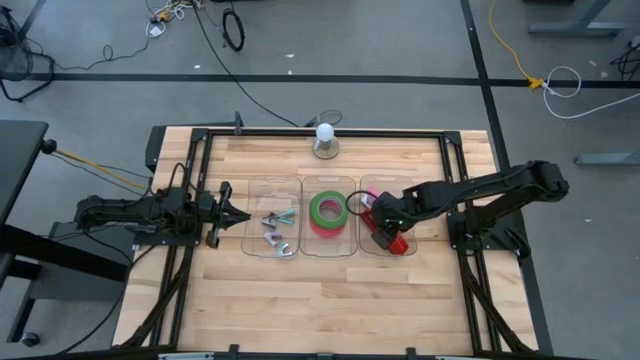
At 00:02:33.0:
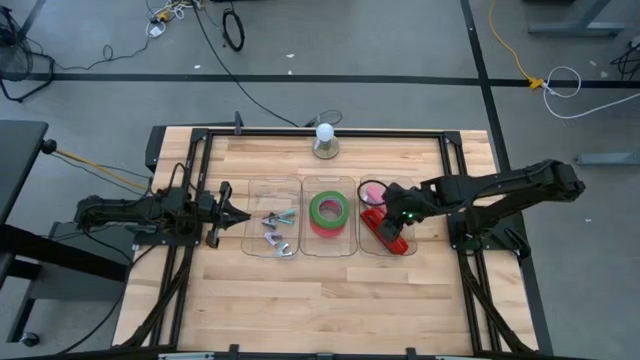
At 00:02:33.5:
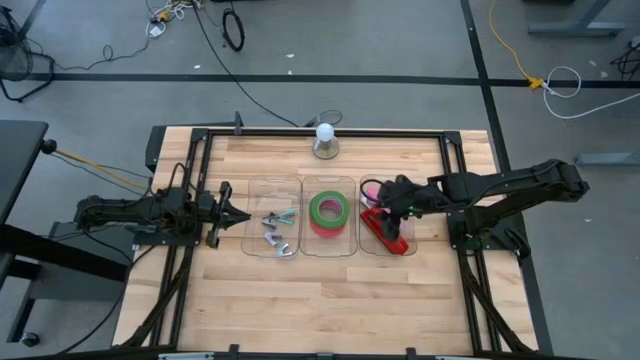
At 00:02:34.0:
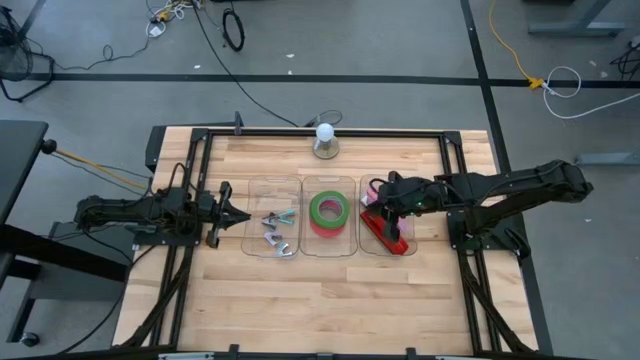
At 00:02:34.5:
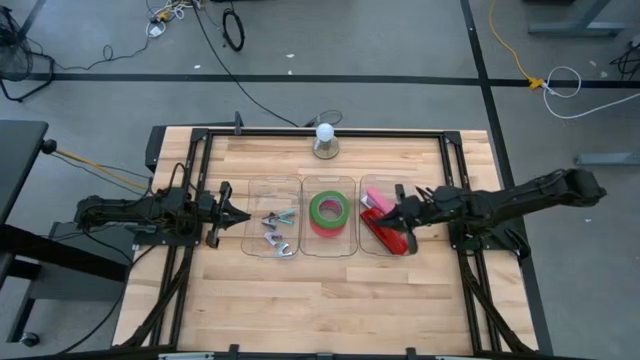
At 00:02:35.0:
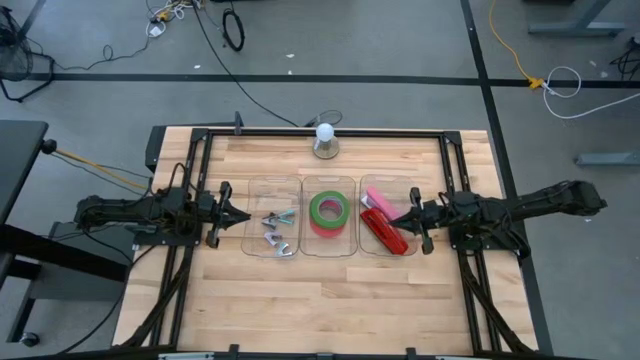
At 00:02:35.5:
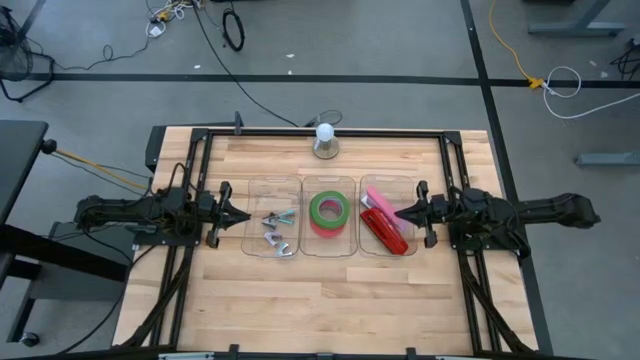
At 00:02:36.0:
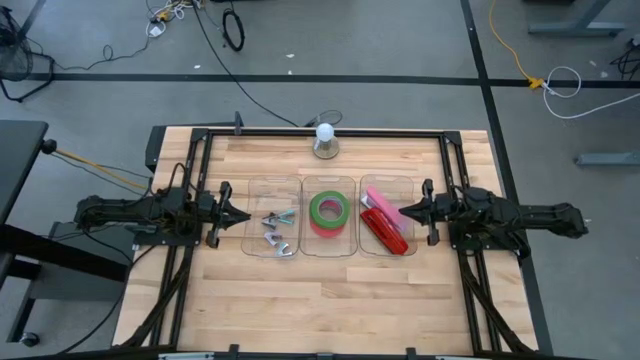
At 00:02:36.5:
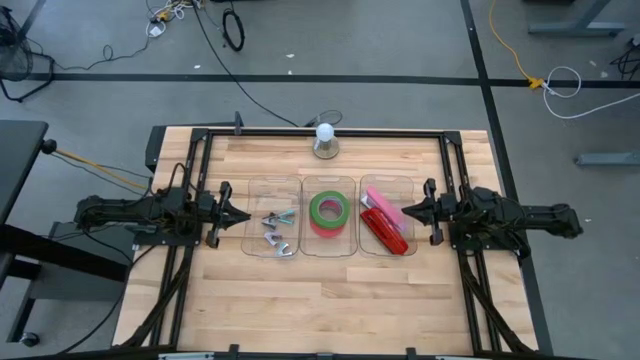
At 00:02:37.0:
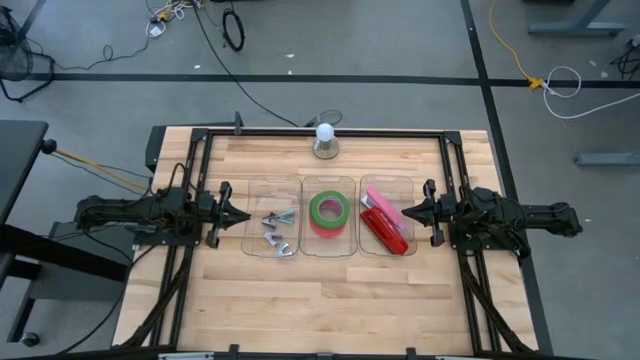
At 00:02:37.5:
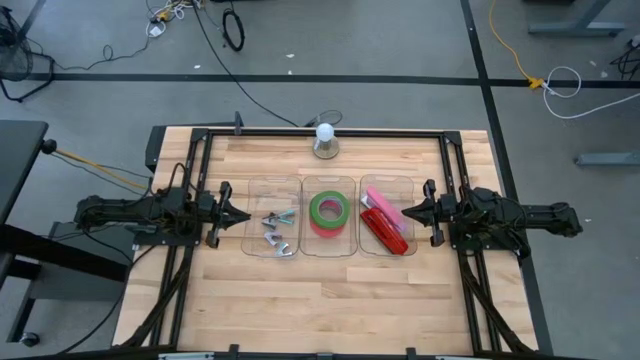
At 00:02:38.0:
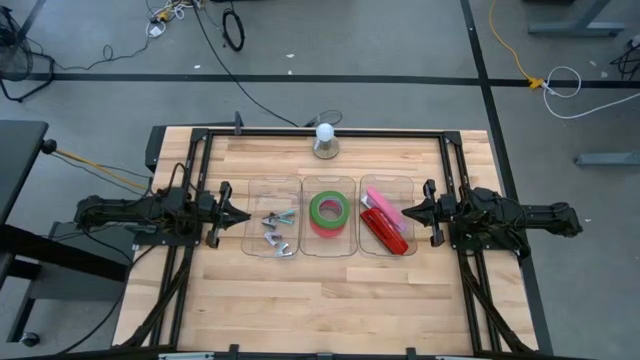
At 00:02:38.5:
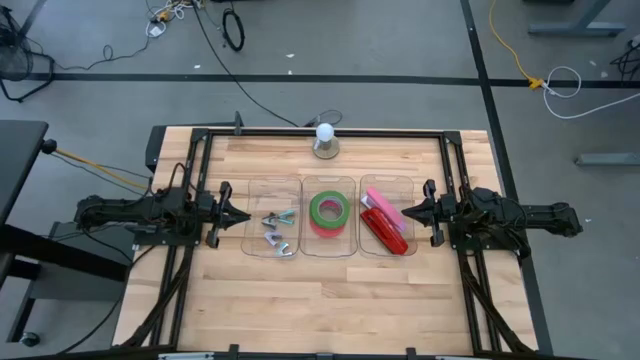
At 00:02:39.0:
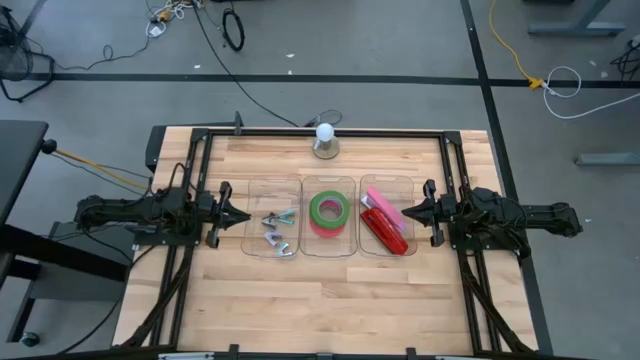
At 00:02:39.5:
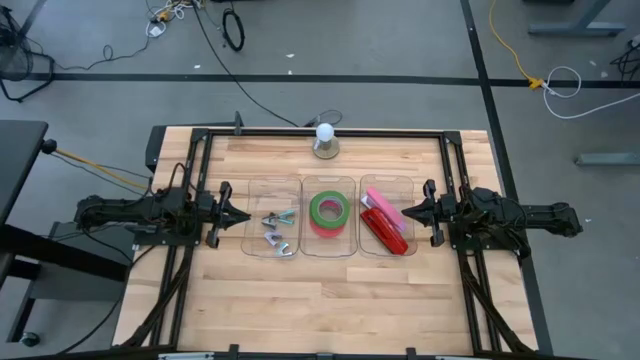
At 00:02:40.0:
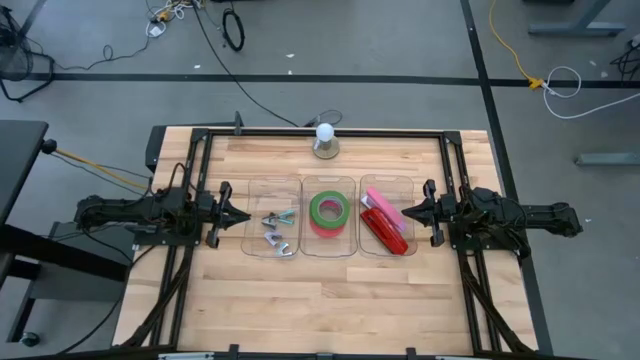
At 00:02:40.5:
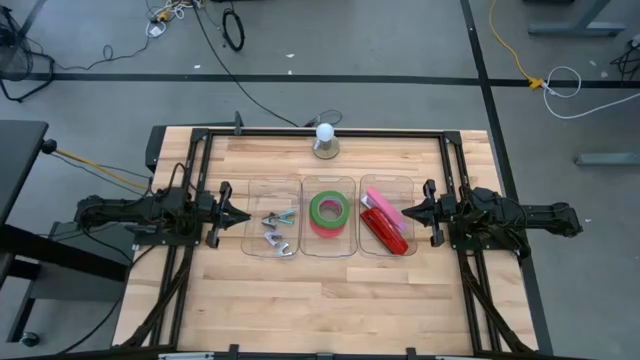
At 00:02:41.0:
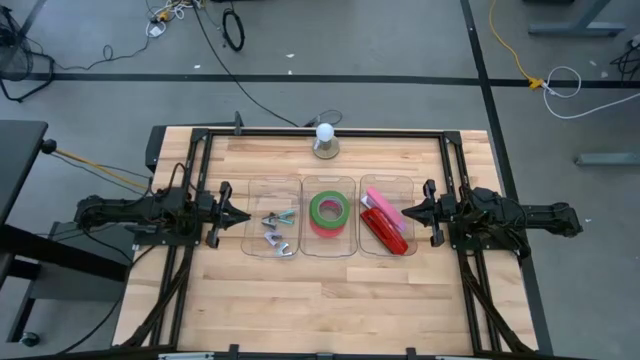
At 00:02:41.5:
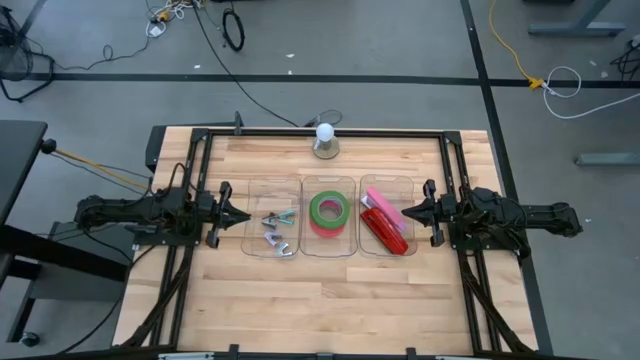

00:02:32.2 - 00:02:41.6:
Task: Pick and place Stapler, Stapler remover, tape
Return to Home Position

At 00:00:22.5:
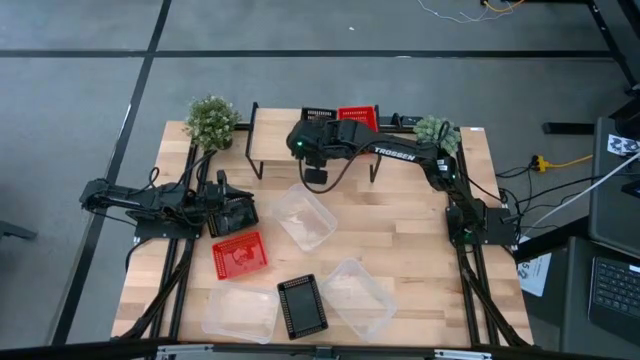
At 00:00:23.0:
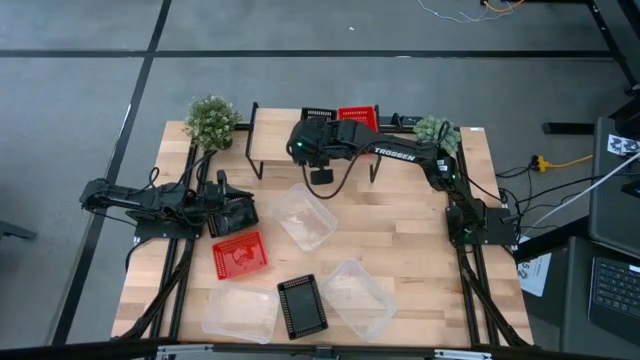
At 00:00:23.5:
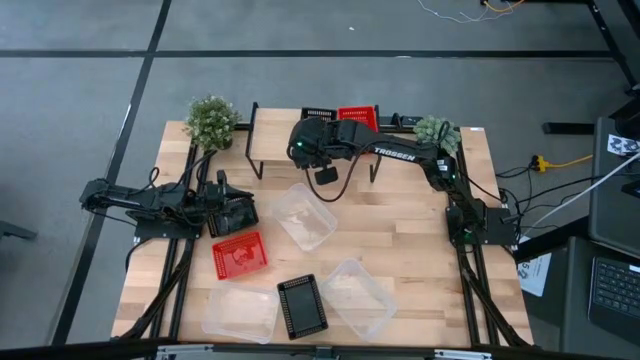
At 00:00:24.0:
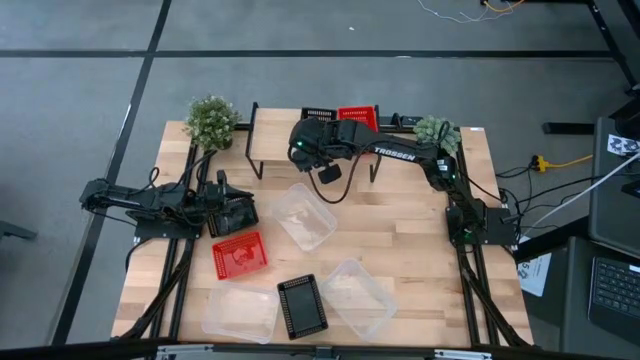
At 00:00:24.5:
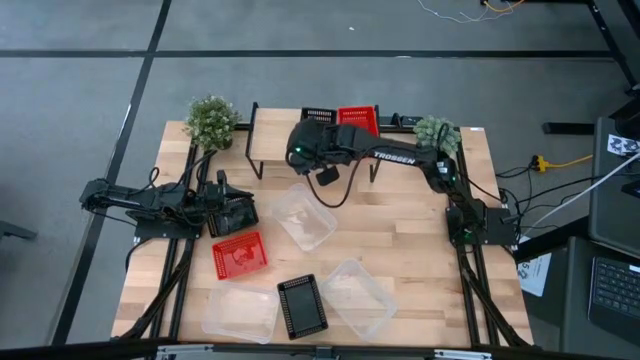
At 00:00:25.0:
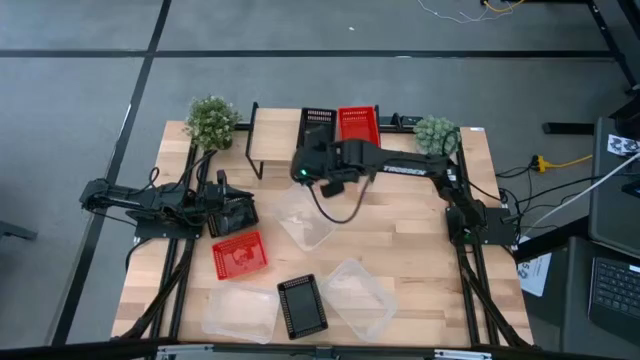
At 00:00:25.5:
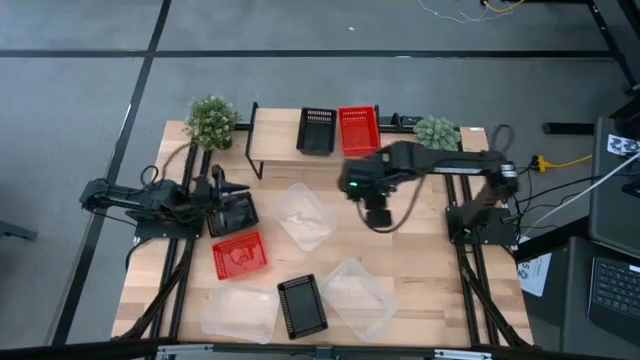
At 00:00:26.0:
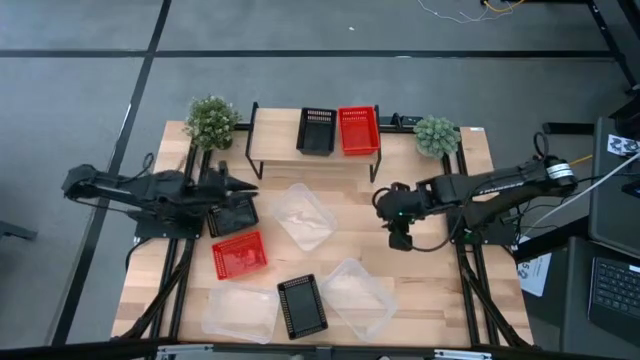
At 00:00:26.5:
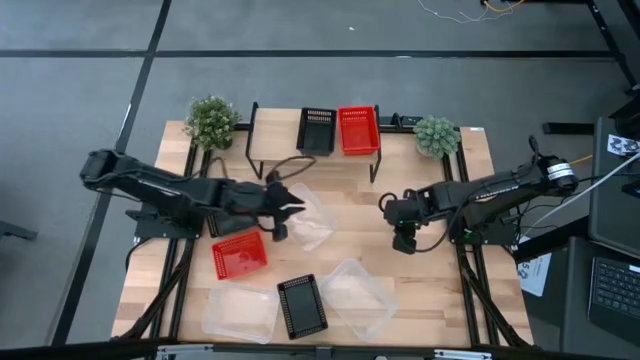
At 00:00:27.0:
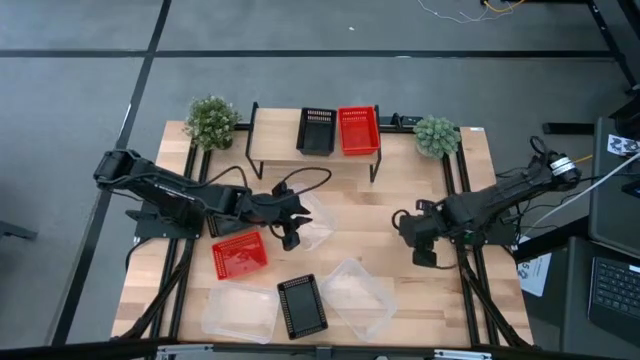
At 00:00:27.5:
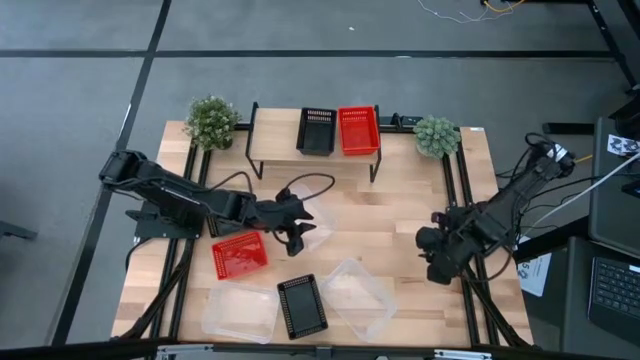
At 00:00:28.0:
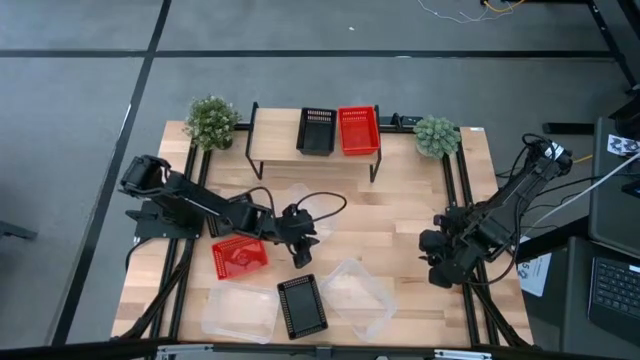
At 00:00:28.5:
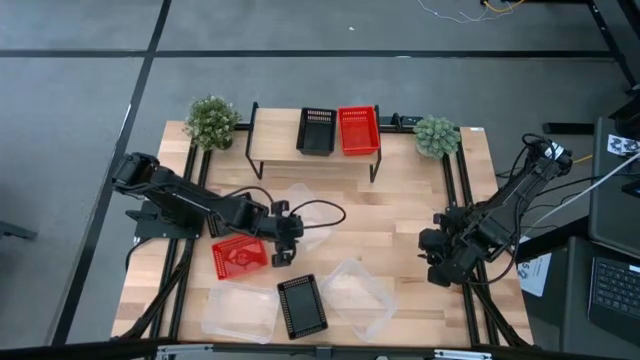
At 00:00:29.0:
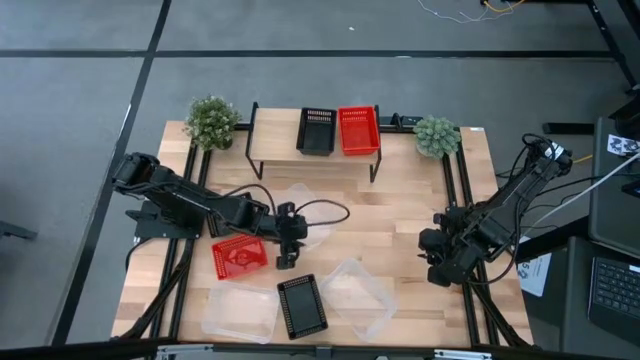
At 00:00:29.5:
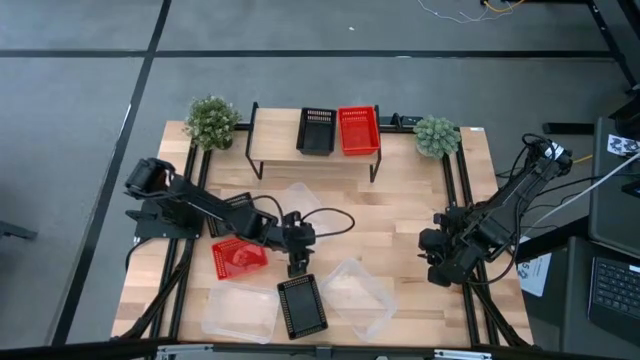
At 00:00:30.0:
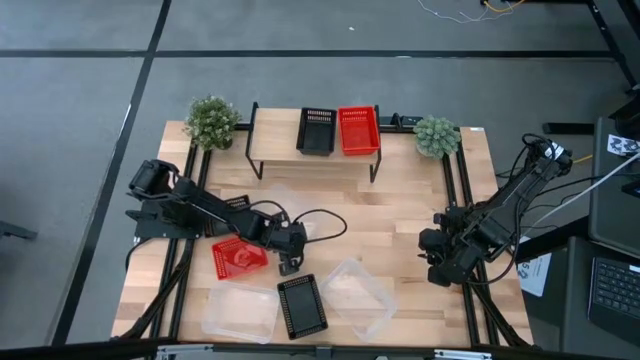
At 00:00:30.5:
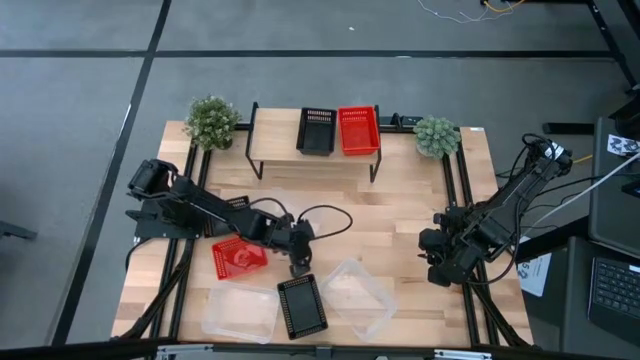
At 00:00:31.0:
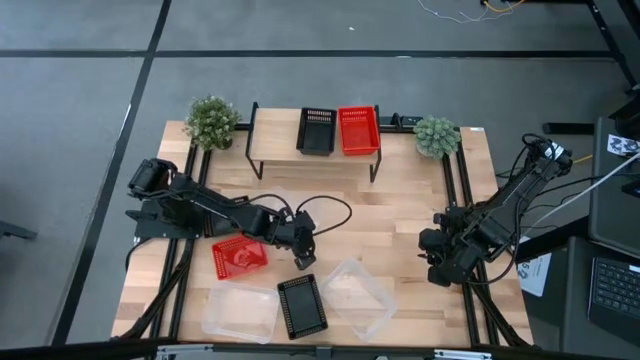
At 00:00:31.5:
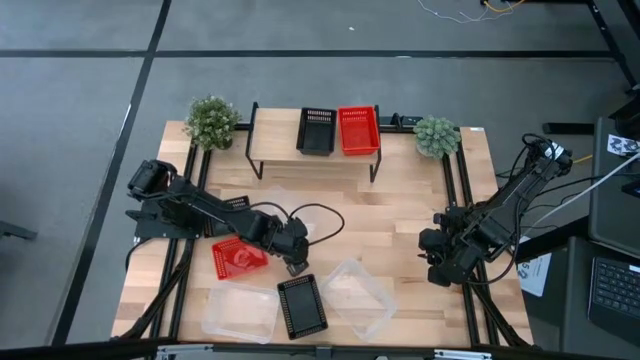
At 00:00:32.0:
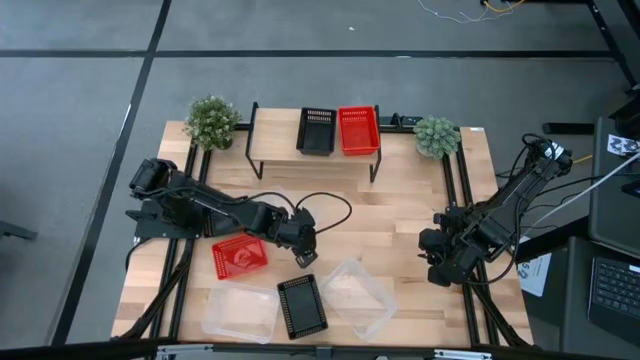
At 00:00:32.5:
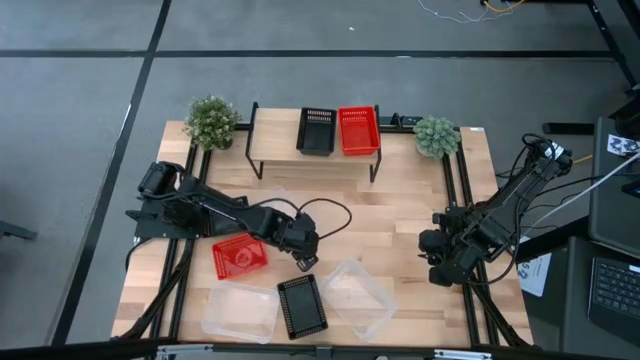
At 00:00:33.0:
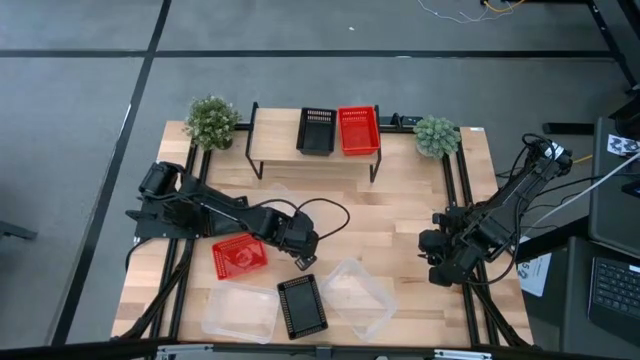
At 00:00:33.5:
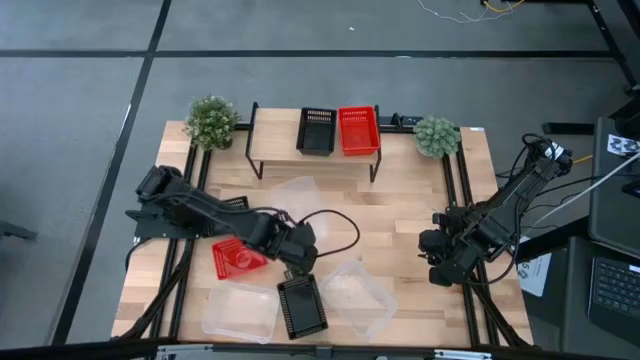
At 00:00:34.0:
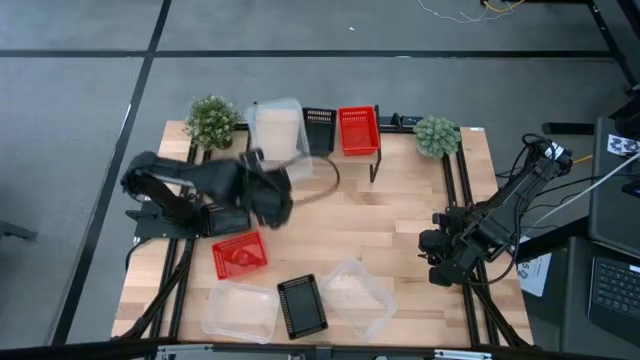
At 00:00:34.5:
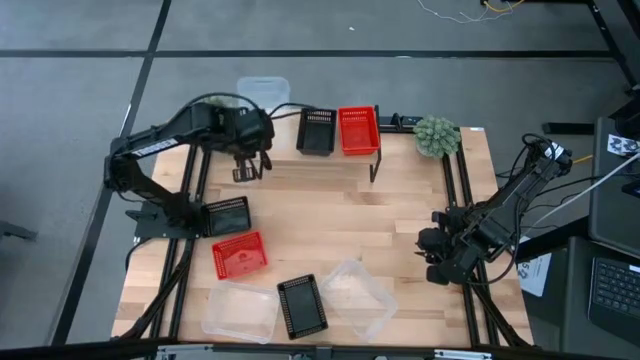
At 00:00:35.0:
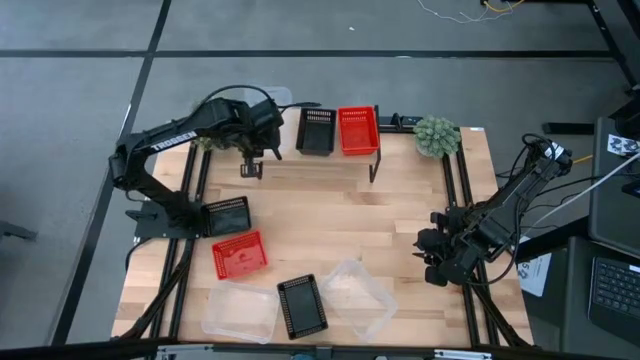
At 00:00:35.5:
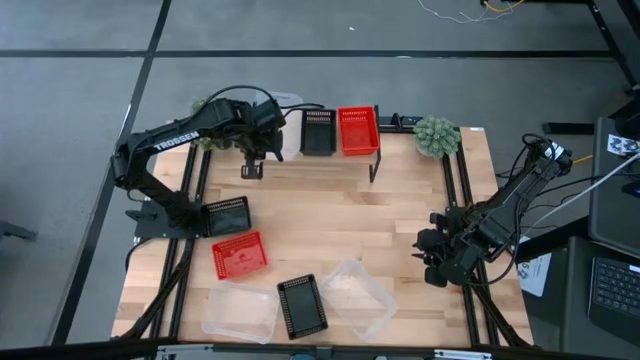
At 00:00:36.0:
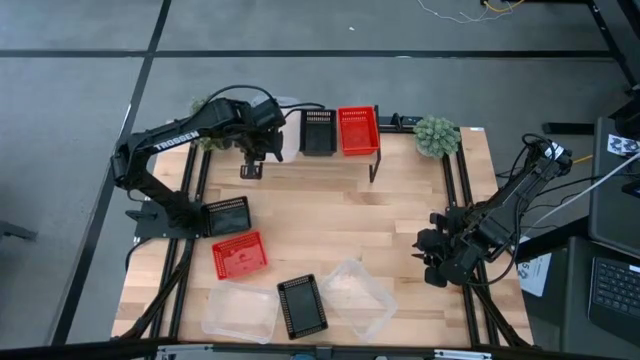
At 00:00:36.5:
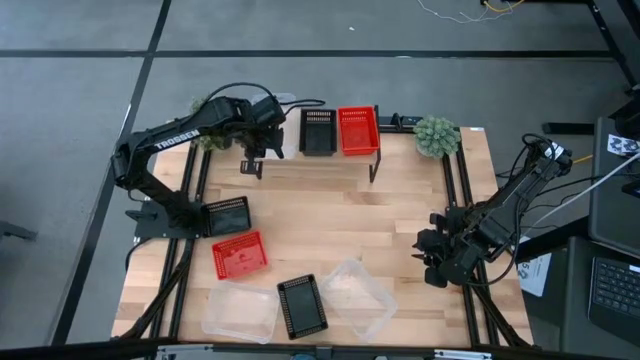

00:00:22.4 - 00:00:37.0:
Task: Stack baskets on shelf by color
Put the top transparent bin on the shelf
